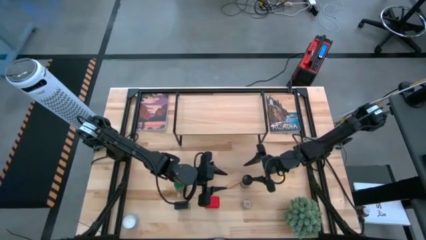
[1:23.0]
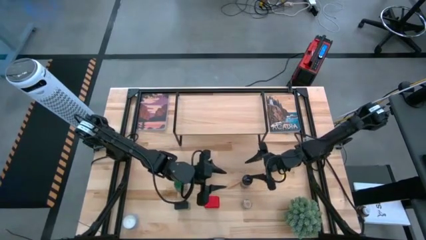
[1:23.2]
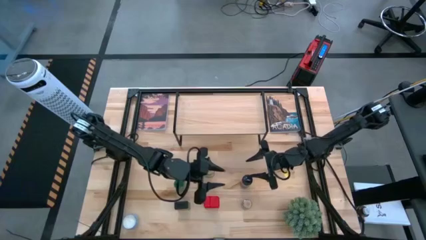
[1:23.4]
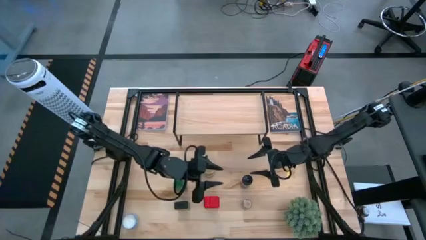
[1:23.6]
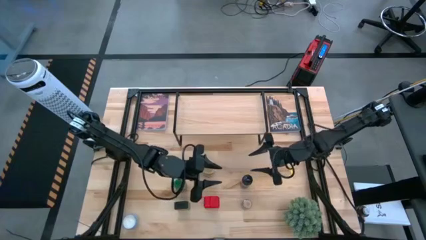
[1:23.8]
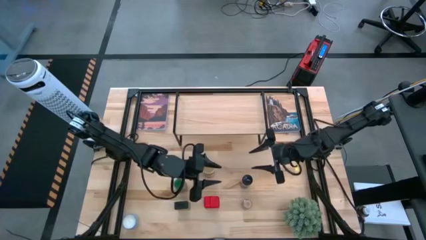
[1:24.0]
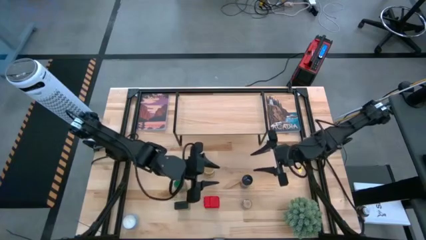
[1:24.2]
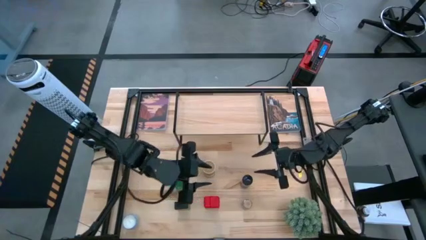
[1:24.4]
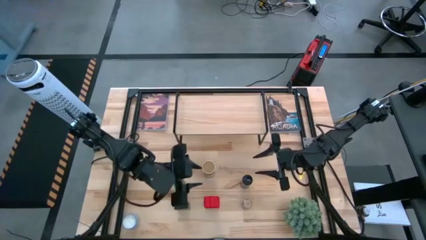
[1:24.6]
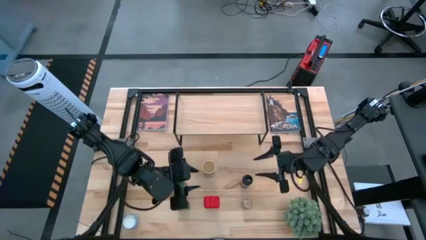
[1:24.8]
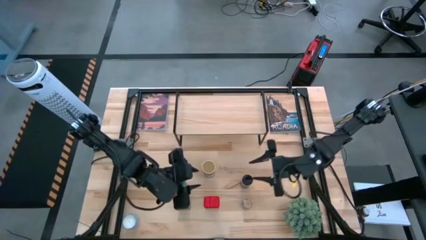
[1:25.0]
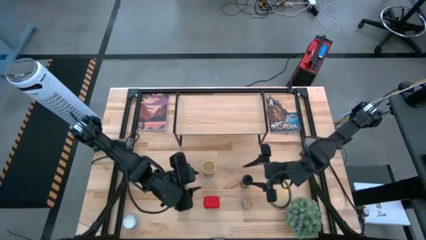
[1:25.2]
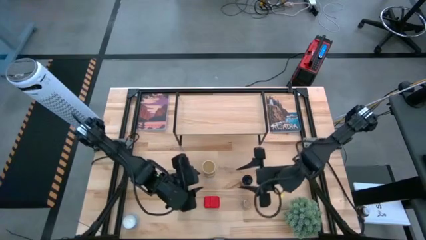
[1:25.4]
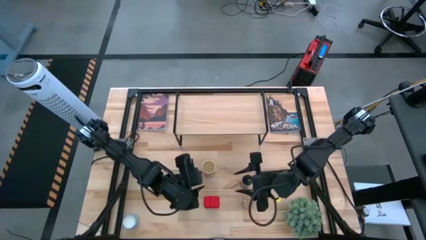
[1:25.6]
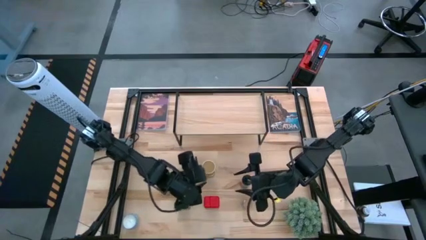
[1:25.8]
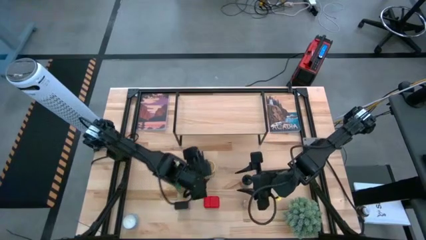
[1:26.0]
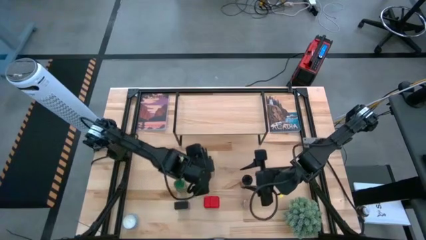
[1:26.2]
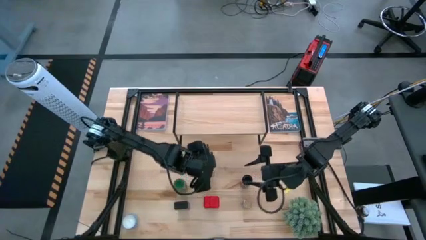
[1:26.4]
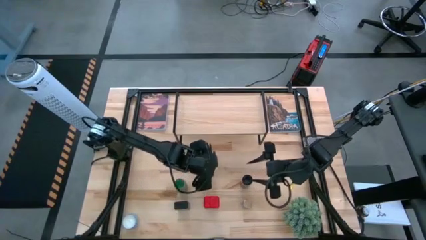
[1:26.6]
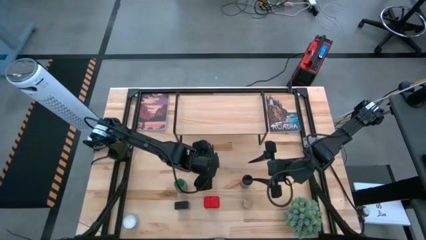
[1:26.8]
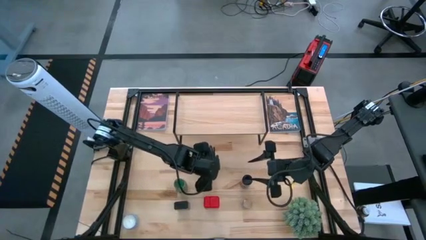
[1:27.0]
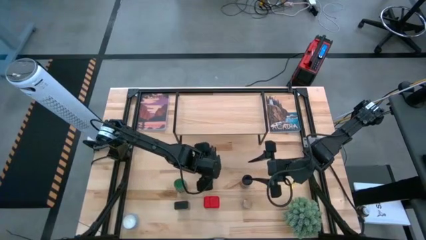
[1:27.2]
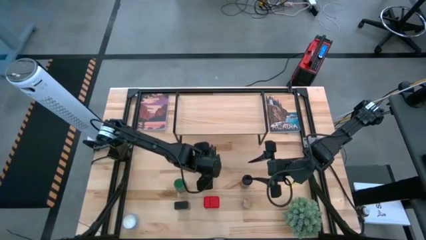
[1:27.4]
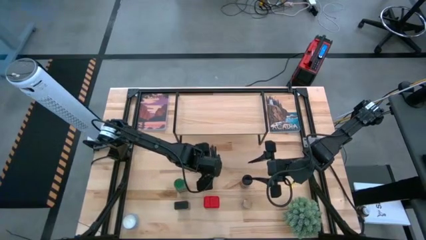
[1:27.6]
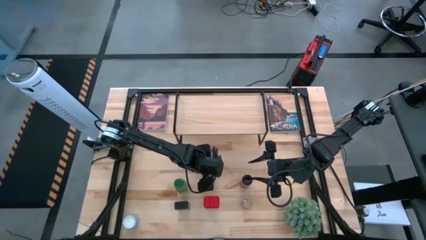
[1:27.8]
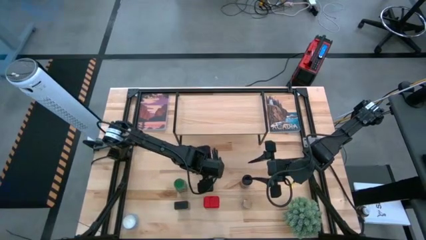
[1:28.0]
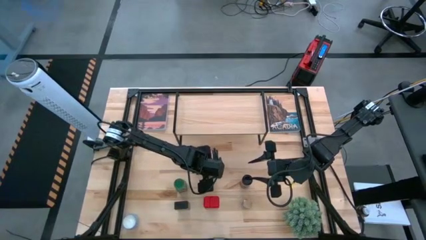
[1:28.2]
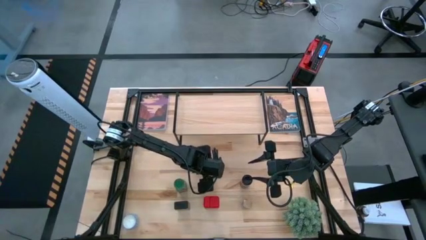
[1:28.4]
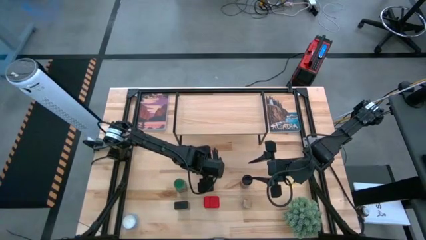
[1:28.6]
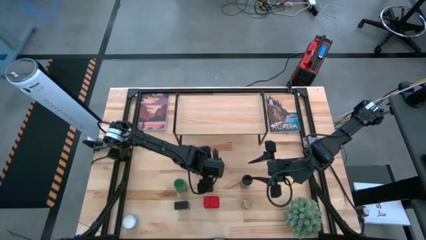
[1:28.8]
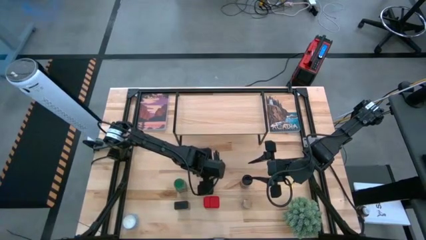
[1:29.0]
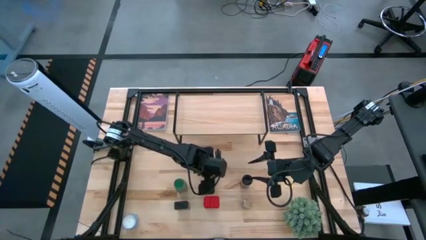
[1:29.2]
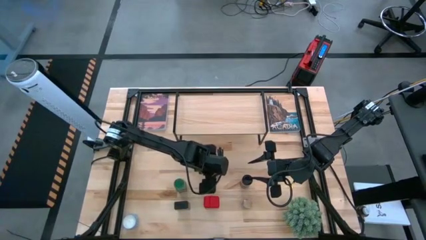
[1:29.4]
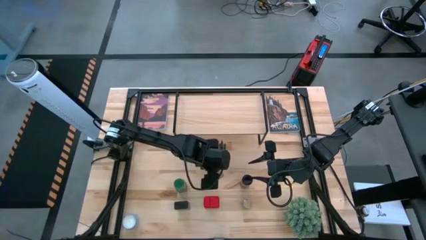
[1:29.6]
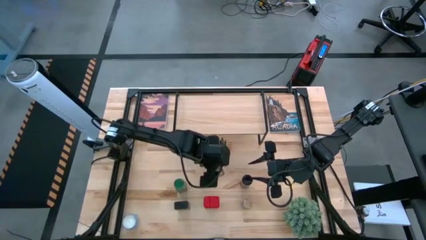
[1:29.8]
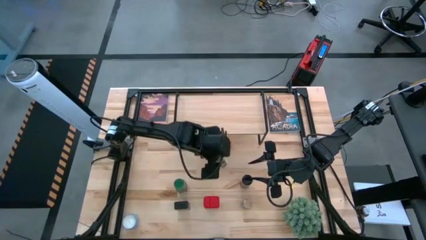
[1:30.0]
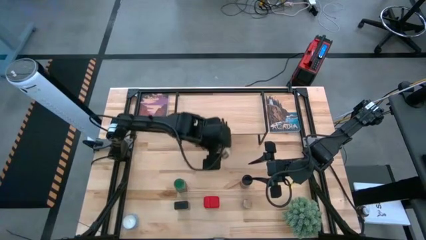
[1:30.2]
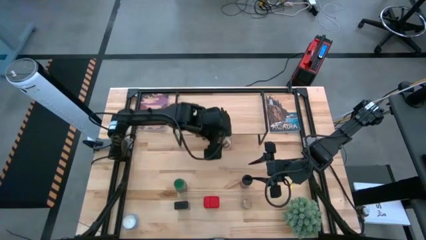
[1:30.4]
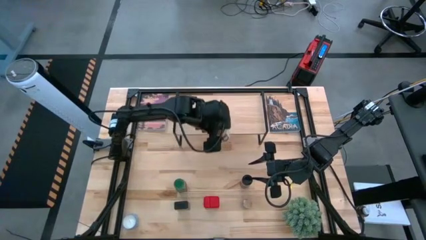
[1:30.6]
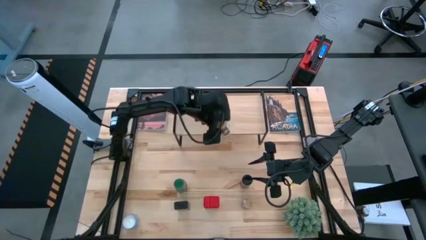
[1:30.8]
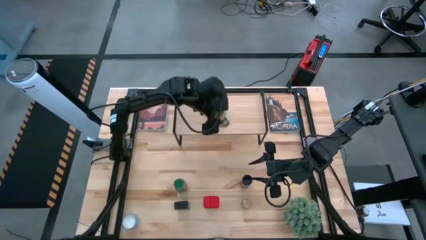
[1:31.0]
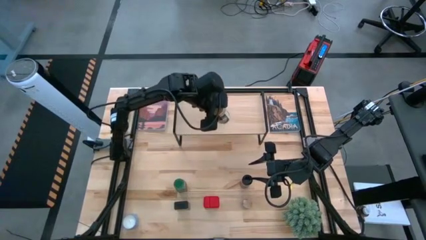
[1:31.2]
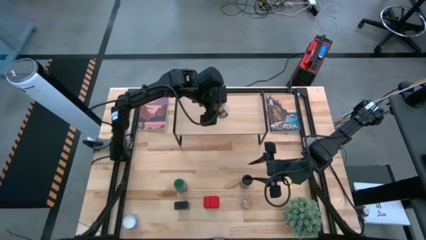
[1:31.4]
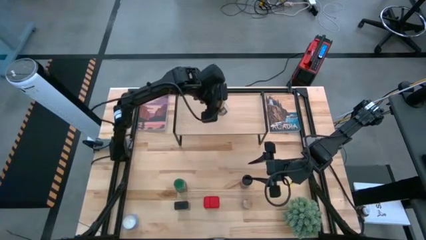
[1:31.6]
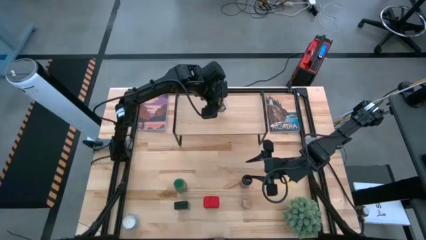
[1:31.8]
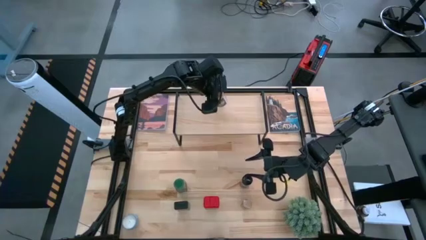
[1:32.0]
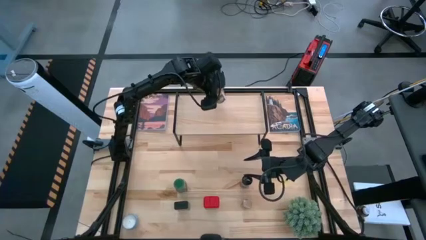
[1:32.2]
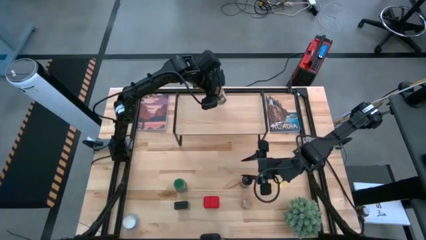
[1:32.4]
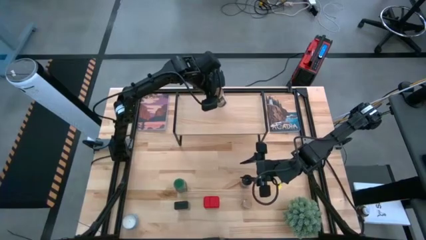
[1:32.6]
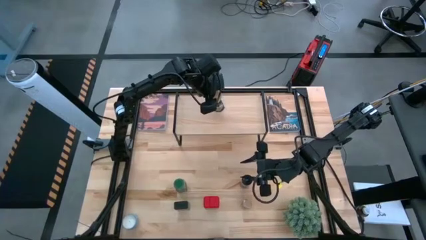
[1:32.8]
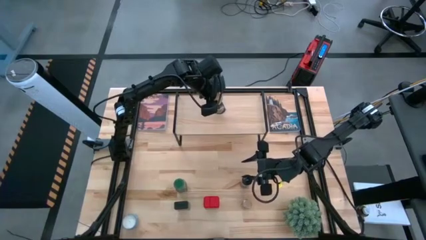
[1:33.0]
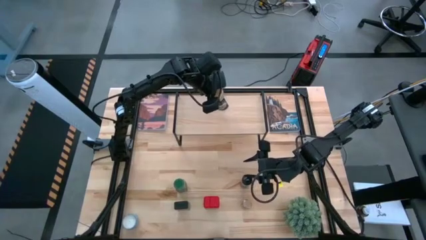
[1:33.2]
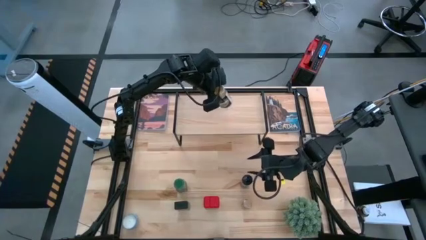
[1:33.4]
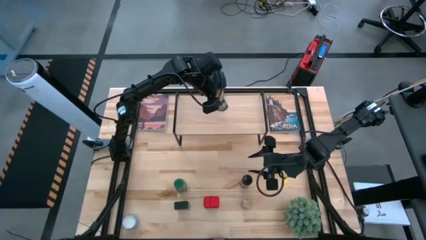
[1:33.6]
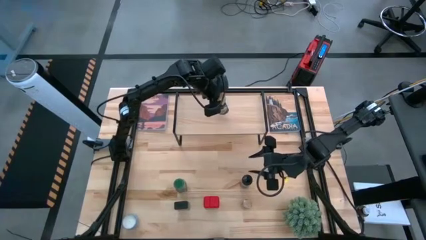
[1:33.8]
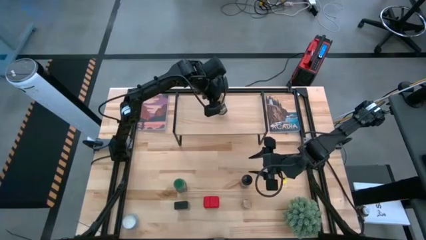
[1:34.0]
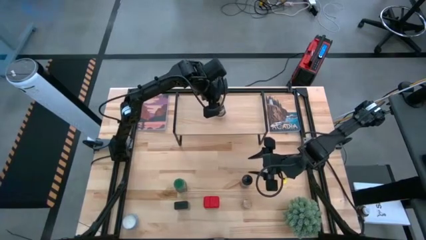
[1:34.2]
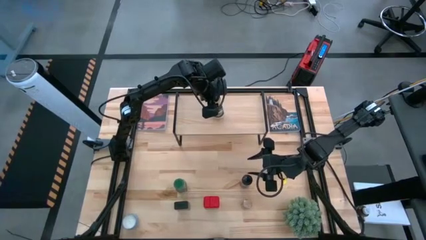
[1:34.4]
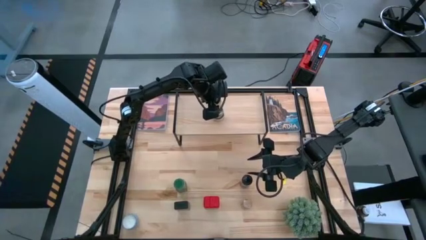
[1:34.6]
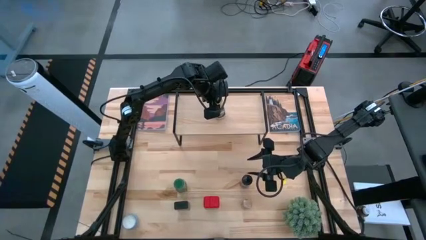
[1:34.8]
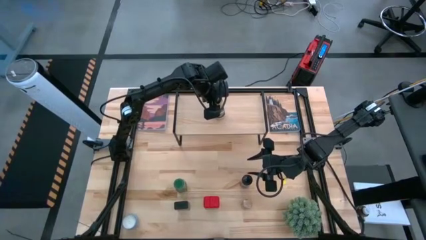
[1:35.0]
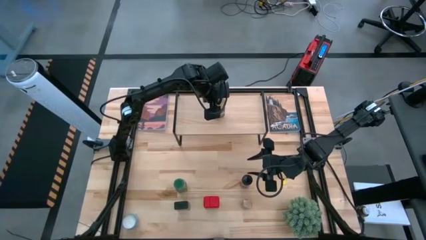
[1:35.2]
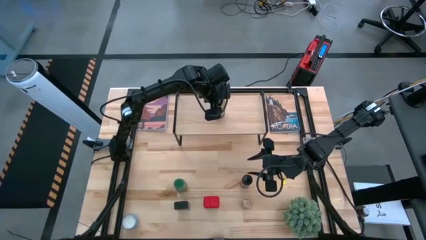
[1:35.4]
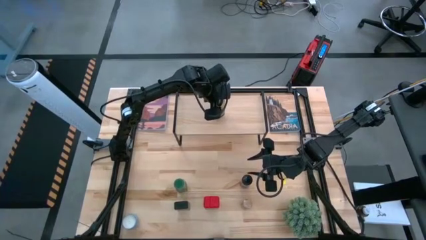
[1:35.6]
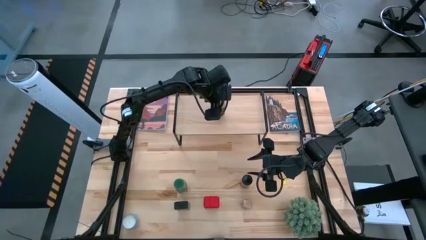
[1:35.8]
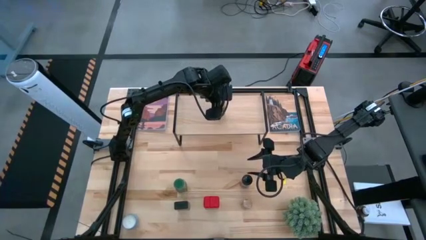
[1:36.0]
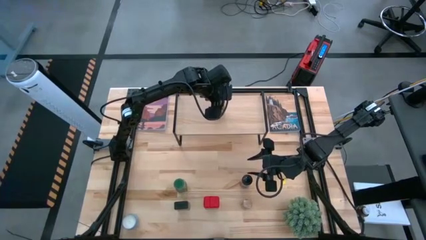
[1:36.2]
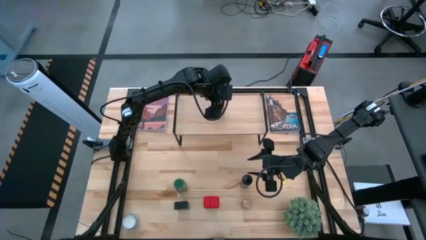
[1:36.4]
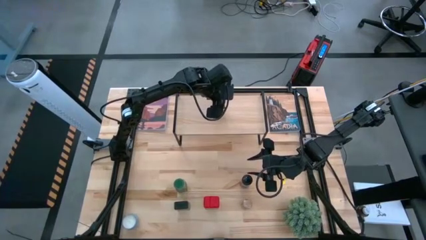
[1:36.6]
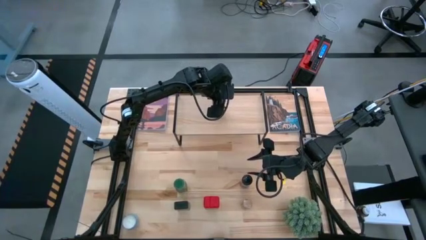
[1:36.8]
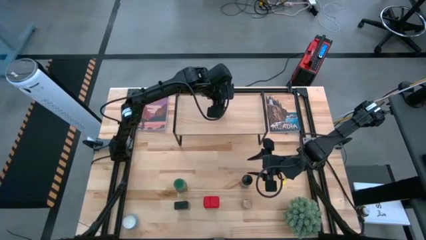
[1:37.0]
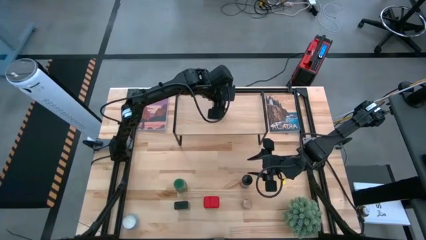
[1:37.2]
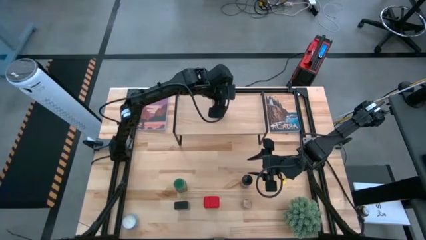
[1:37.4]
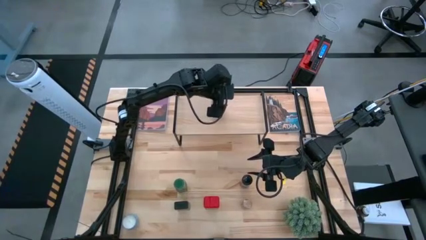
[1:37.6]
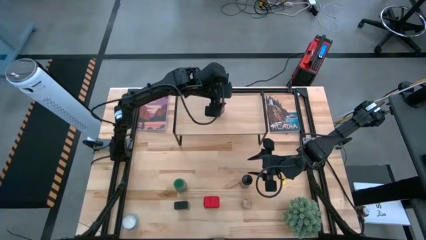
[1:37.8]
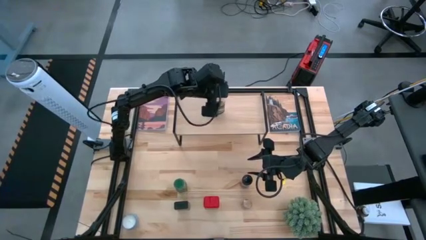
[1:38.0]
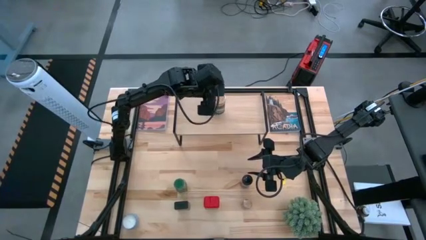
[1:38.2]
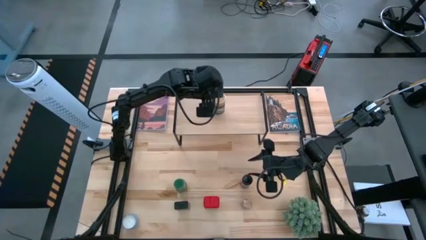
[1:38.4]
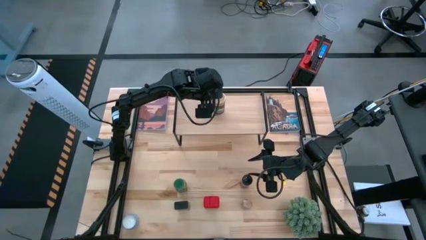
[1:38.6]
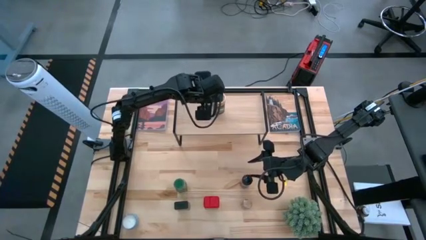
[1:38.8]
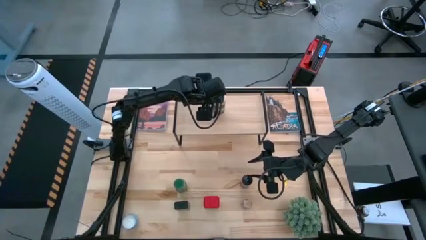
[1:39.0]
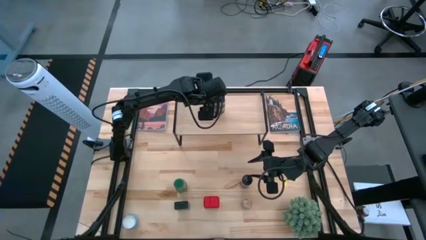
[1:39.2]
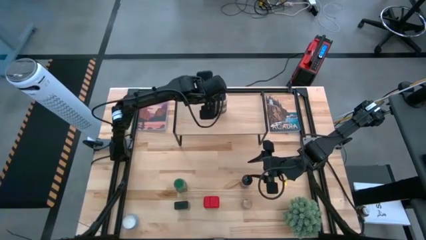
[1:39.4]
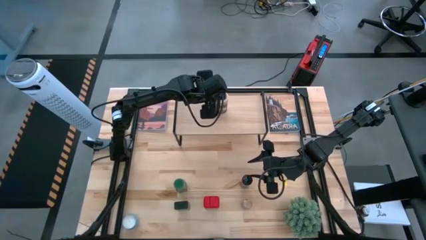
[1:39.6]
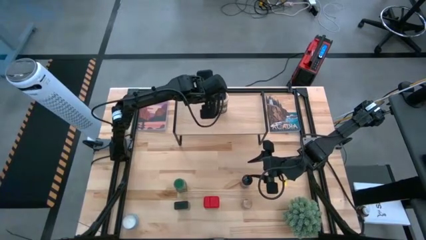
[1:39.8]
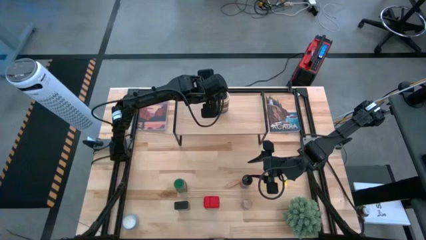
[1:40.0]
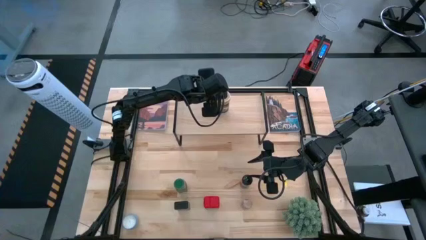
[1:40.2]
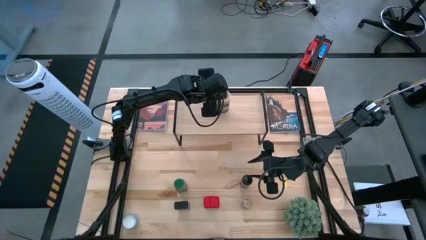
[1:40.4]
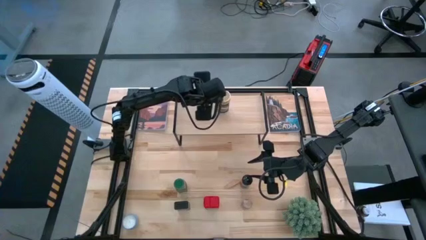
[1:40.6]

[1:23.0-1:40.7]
Task: Shelf spices
Put the yellow seasoning bottle on the shelf
